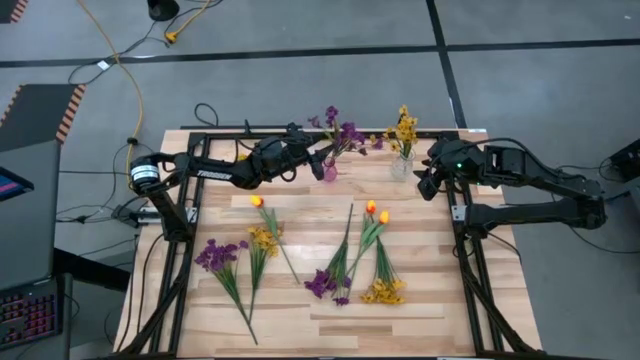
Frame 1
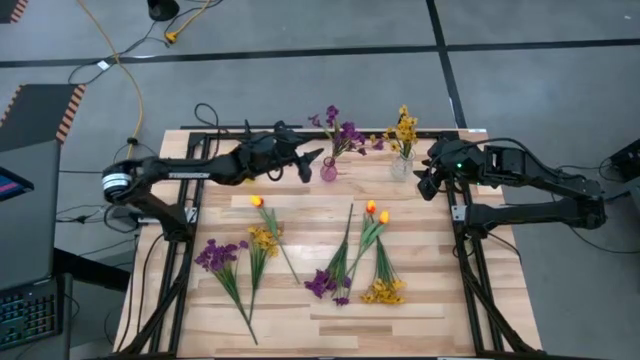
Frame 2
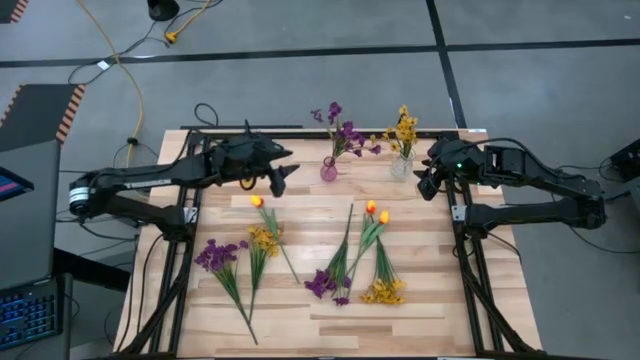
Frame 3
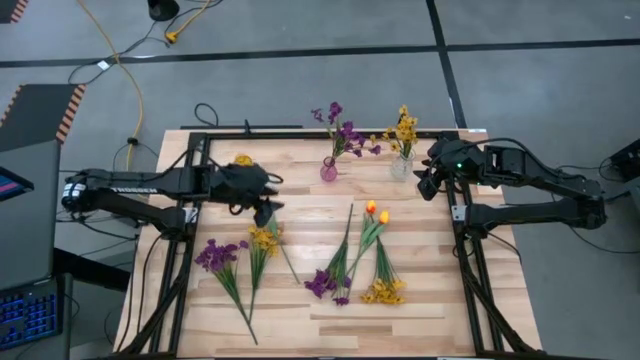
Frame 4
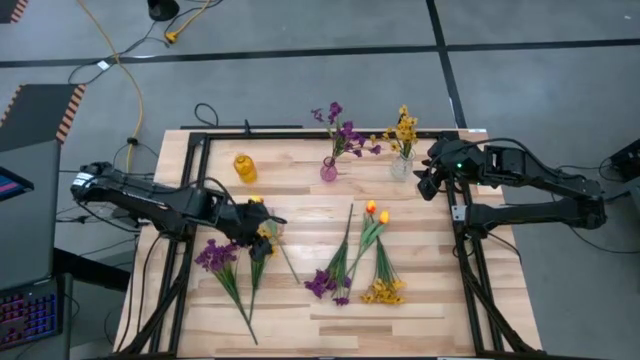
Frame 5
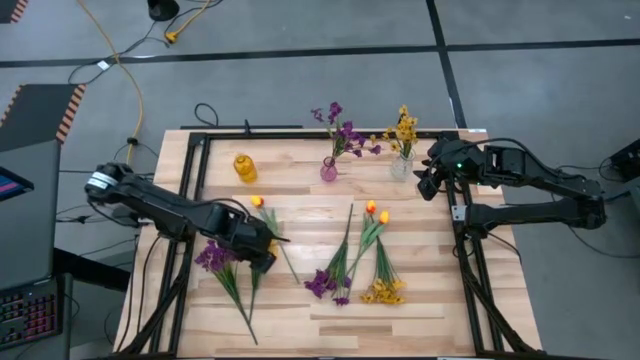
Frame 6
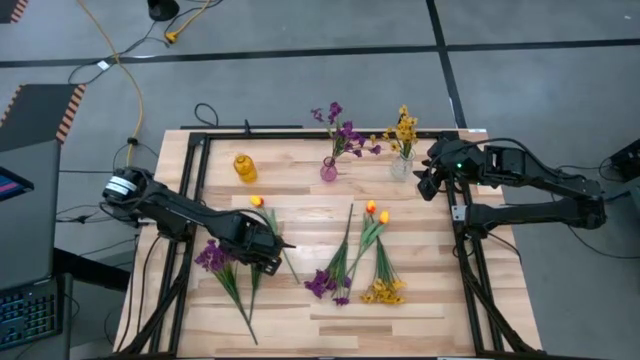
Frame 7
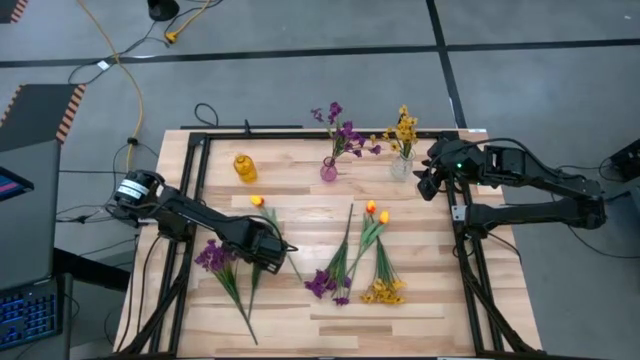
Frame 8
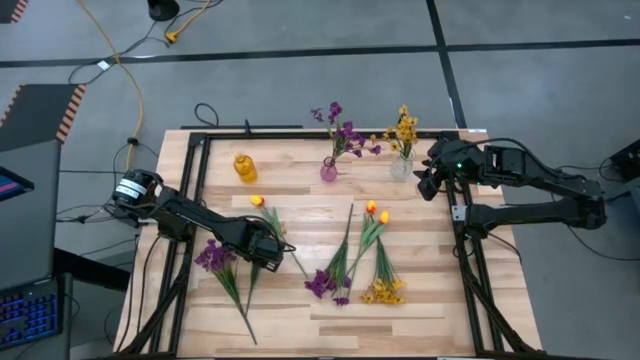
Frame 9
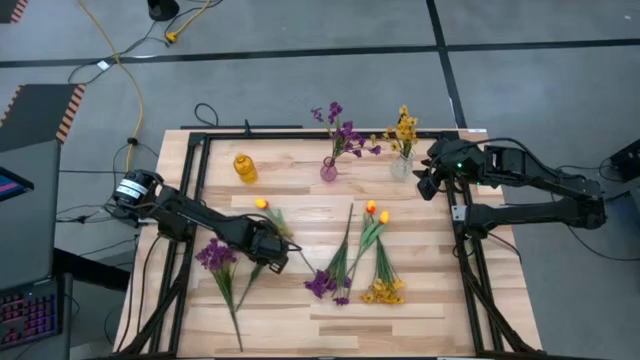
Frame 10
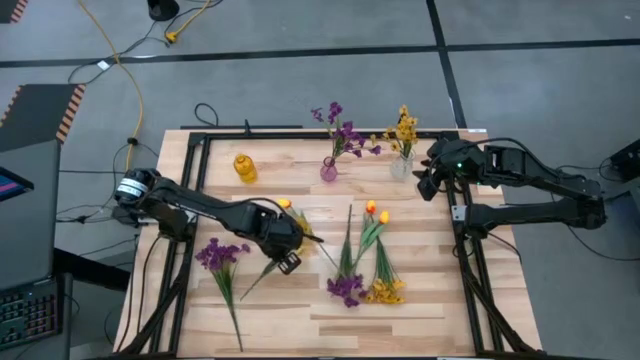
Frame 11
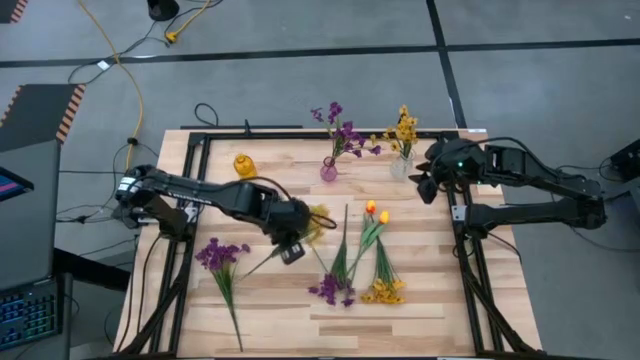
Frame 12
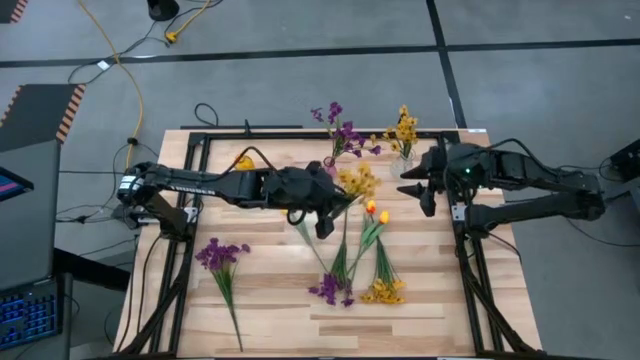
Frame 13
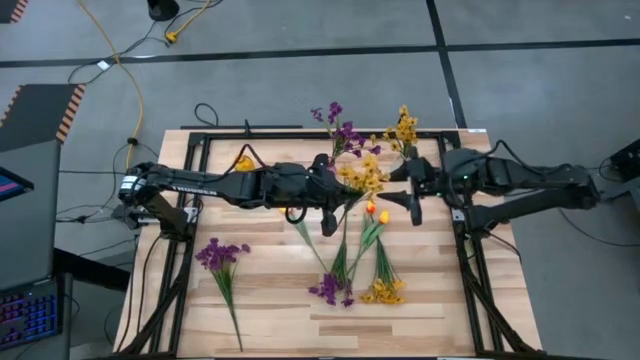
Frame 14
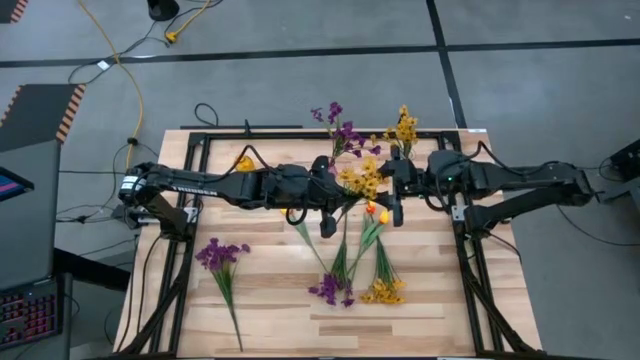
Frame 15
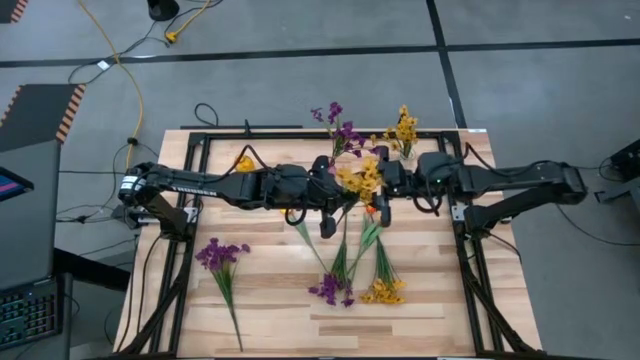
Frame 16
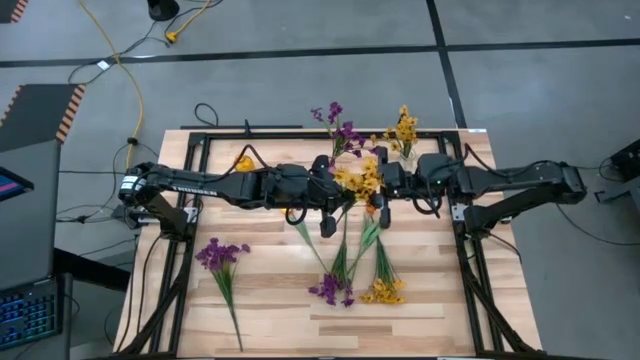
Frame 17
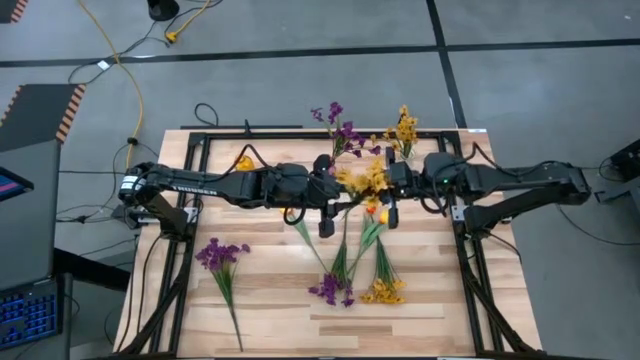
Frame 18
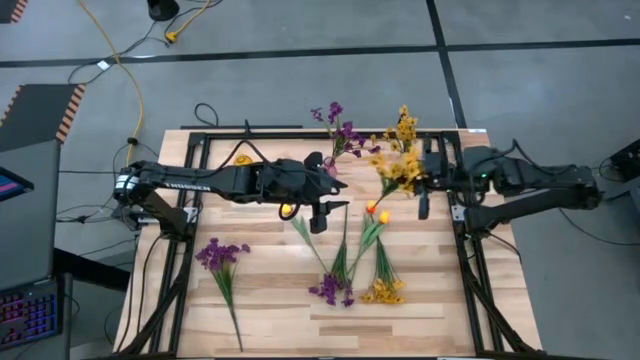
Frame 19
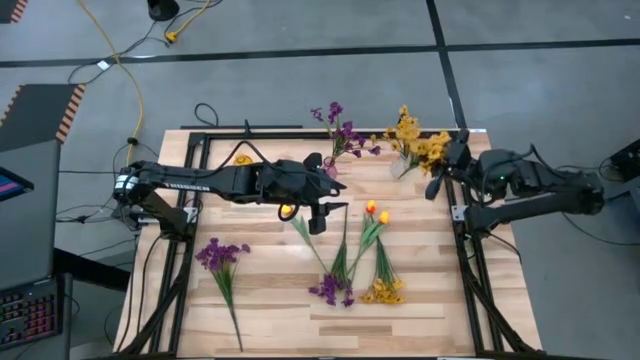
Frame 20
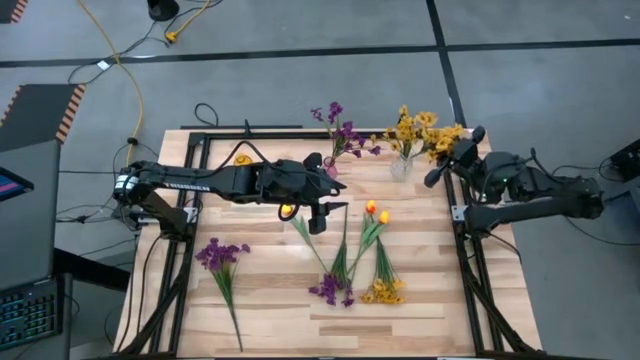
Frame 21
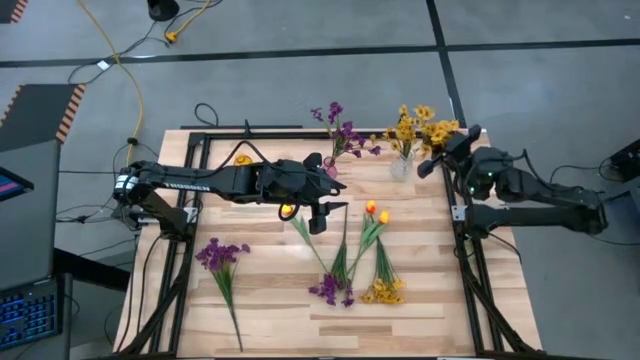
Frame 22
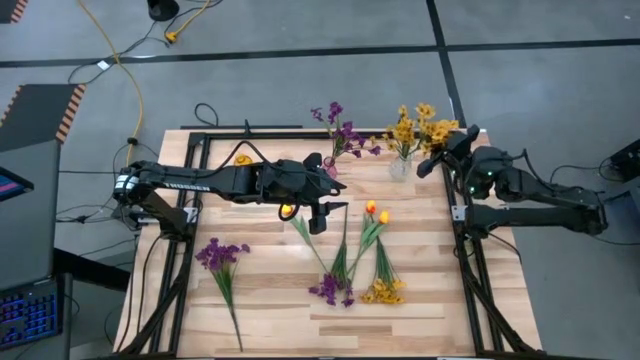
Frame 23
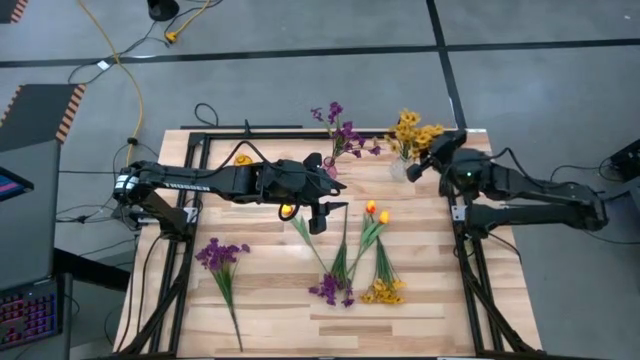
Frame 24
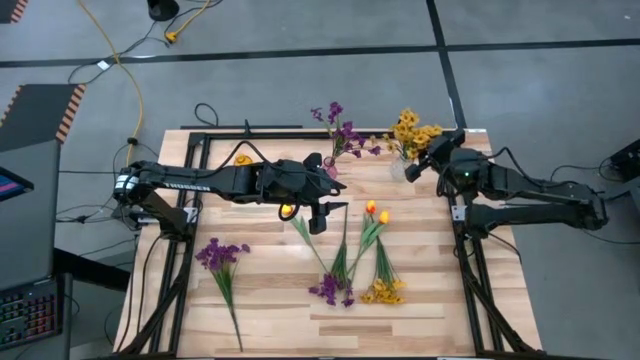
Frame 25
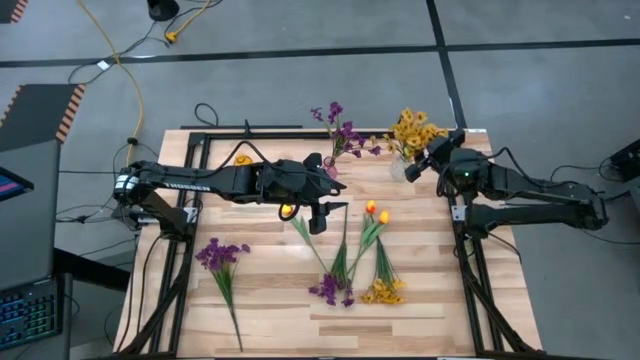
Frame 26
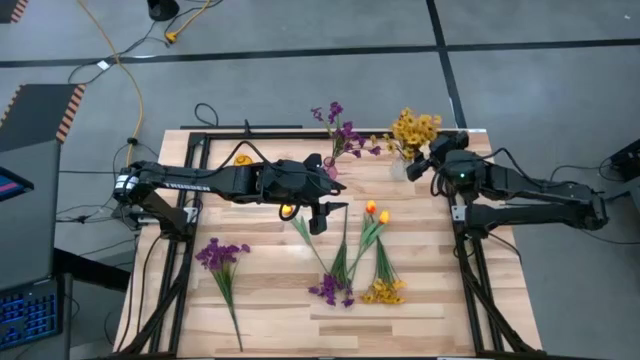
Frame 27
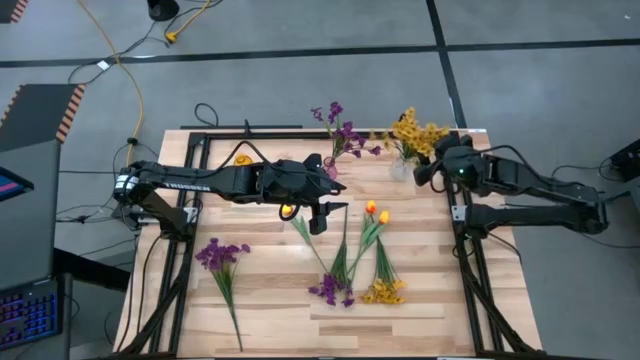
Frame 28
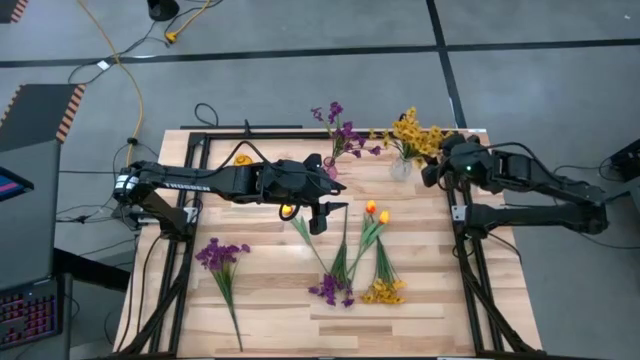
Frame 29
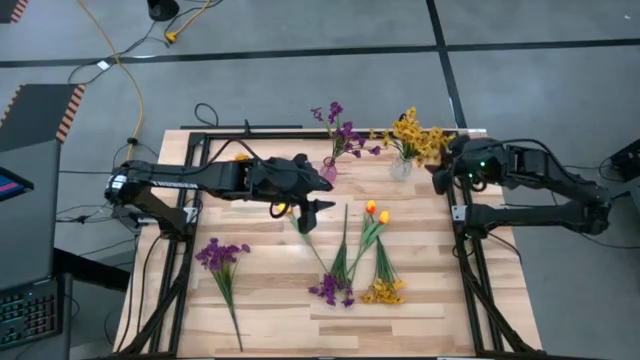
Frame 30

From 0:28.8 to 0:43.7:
Task: Sort flowers into vase by color
Put the left yellow flowers into the transparent vase

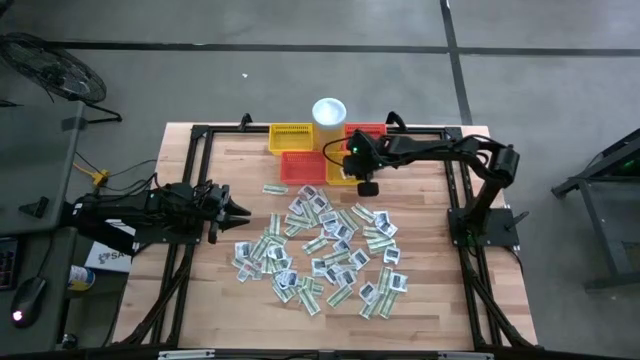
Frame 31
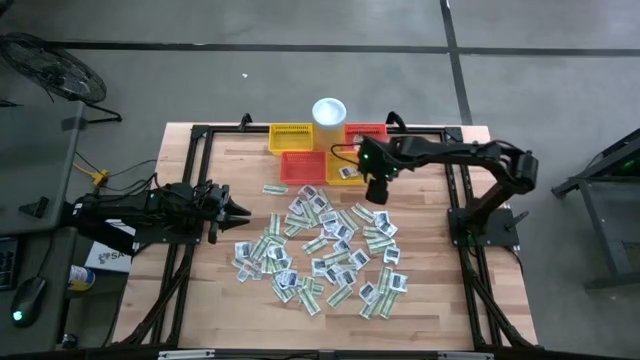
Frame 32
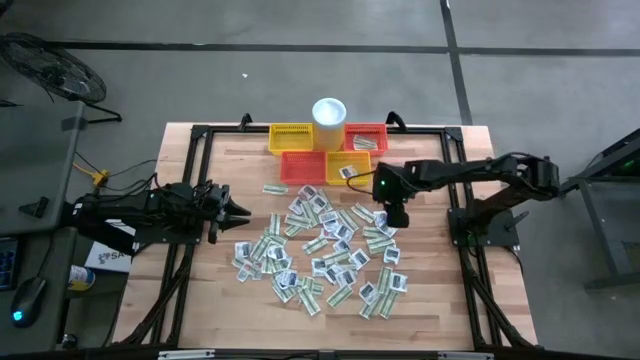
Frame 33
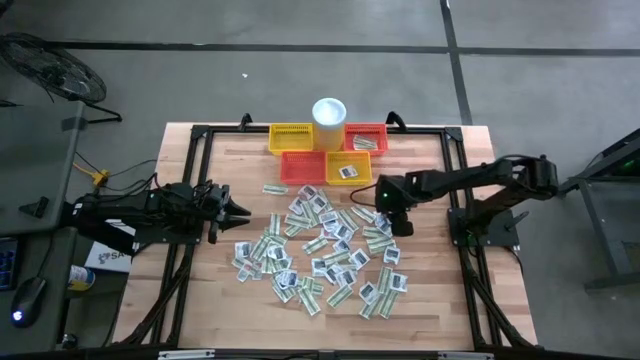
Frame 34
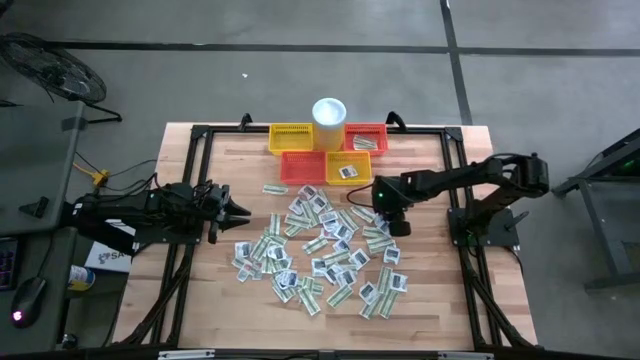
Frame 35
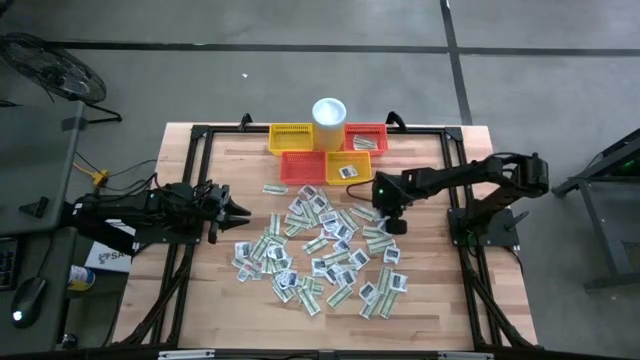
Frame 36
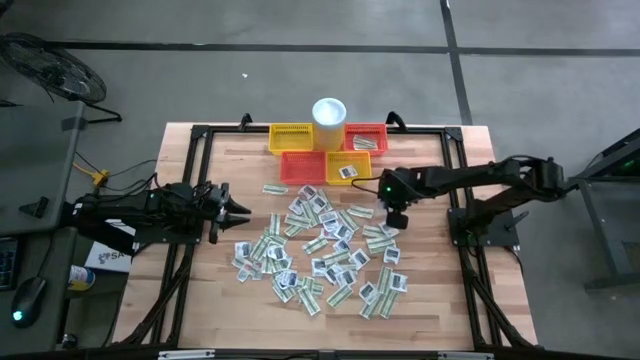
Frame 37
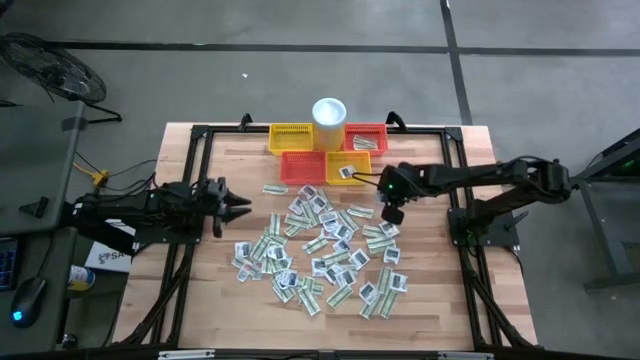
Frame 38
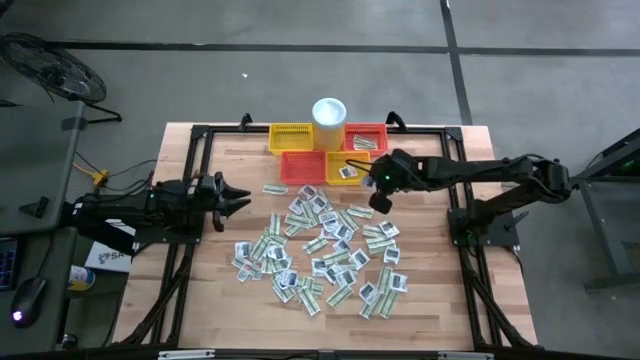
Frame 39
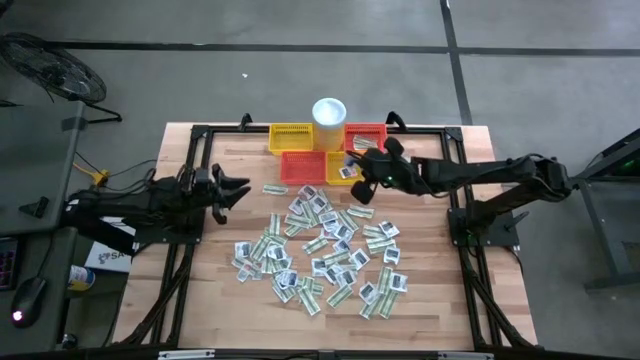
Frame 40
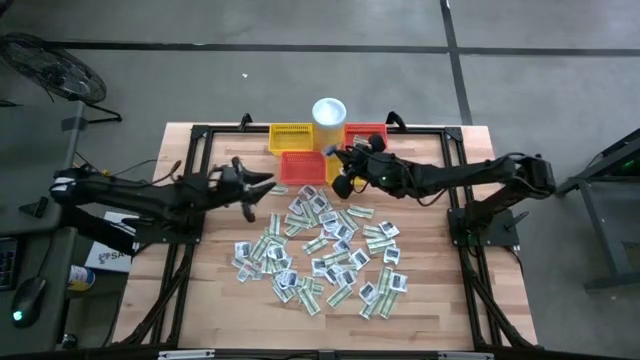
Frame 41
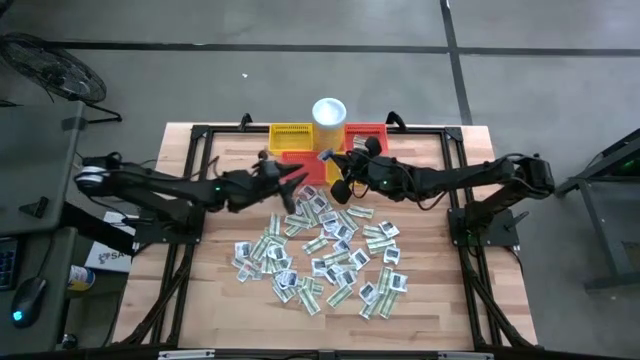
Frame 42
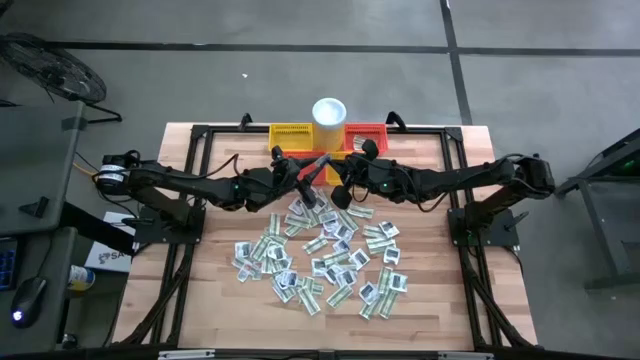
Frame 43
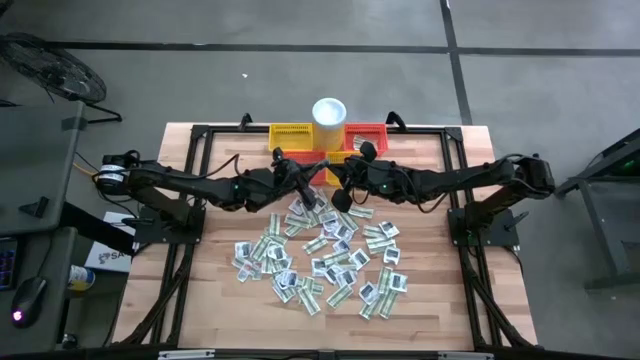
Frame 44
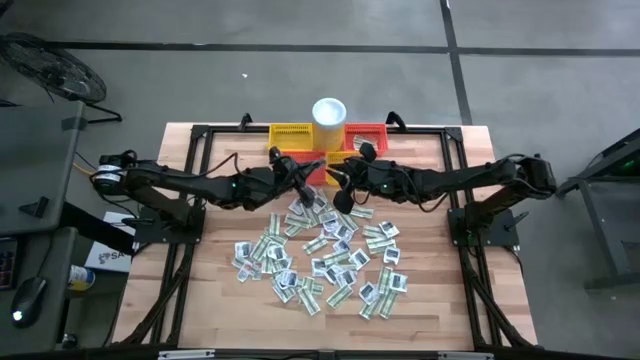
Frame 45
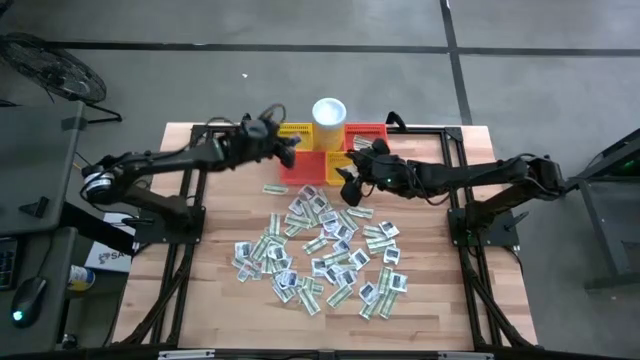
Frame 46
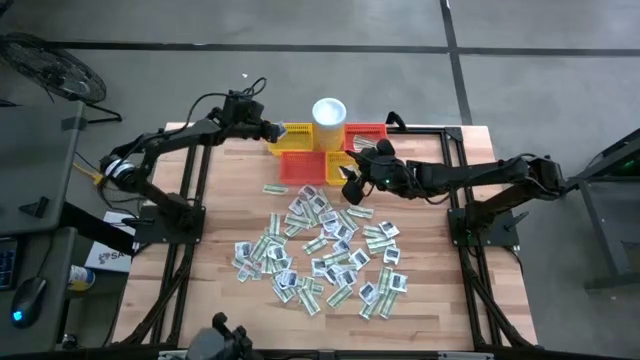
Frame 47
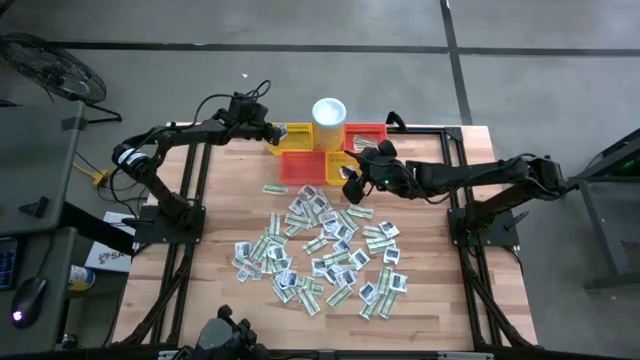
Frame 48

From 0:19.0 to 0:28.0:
Task: Pick & Place First Aid Supplies
Put the blue alcohol pad into the top yellow basket
